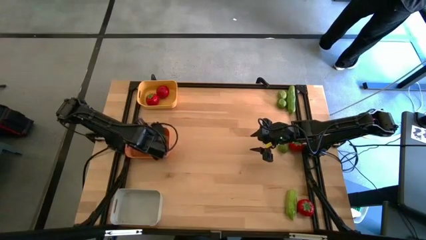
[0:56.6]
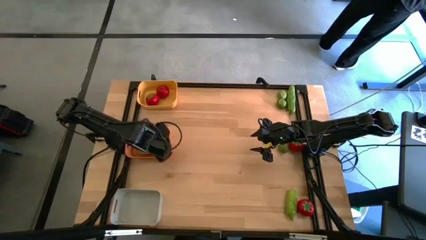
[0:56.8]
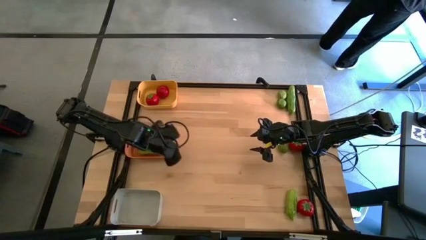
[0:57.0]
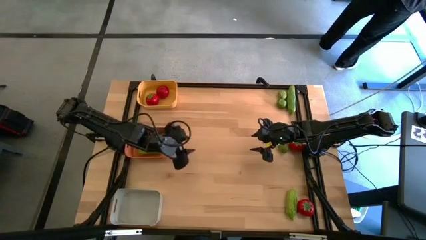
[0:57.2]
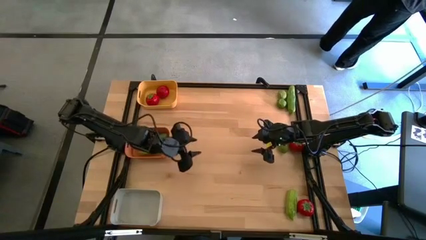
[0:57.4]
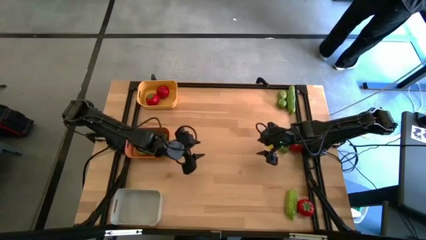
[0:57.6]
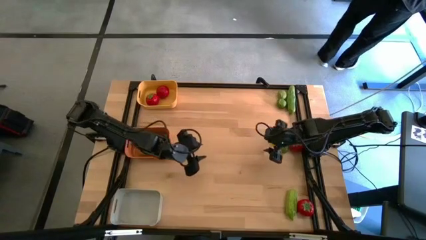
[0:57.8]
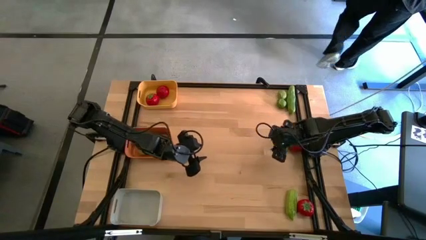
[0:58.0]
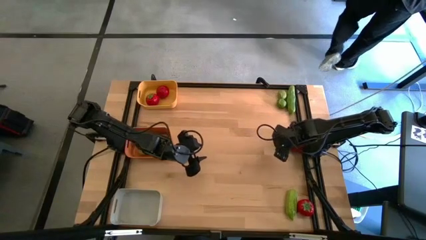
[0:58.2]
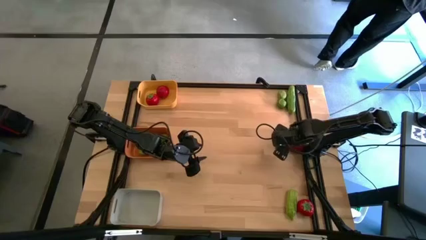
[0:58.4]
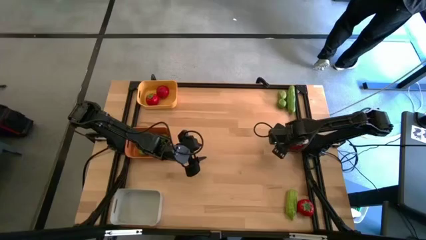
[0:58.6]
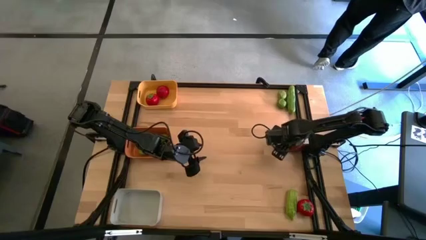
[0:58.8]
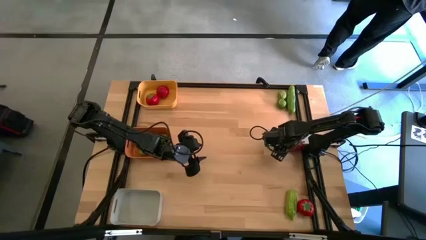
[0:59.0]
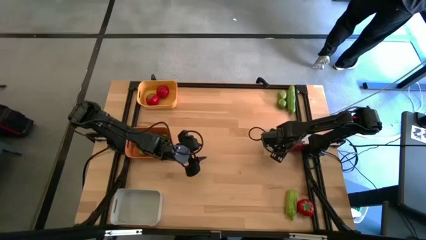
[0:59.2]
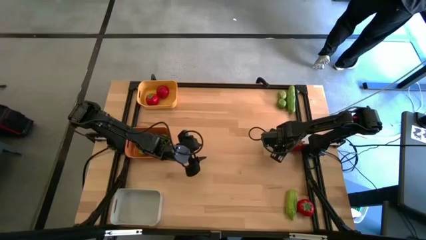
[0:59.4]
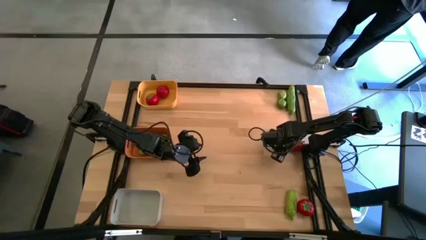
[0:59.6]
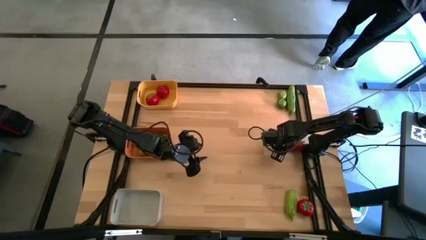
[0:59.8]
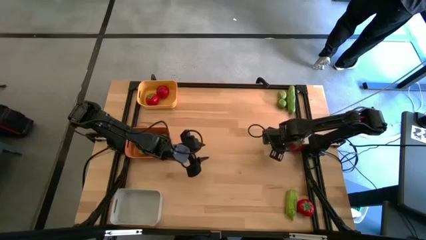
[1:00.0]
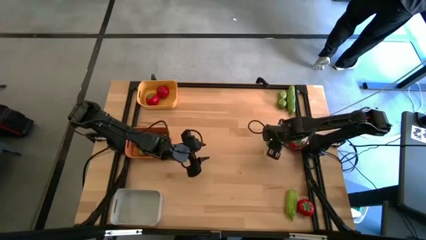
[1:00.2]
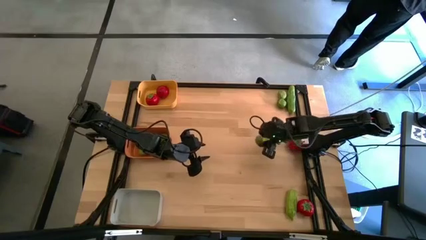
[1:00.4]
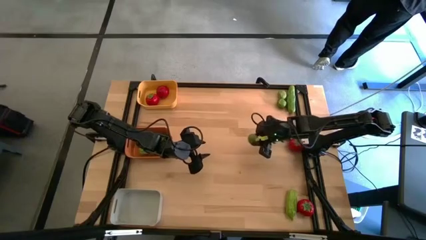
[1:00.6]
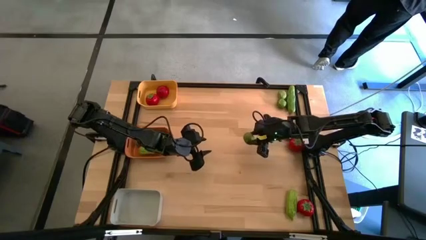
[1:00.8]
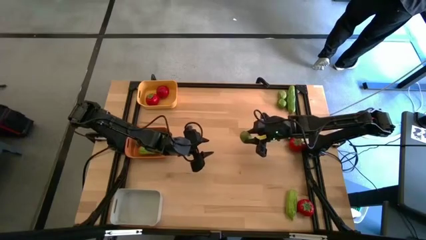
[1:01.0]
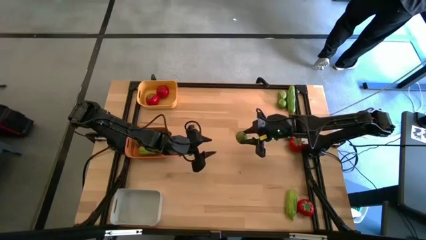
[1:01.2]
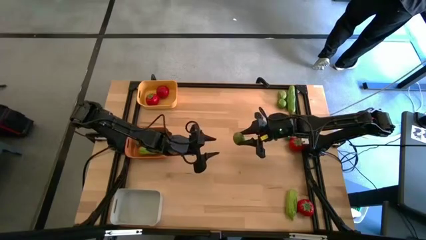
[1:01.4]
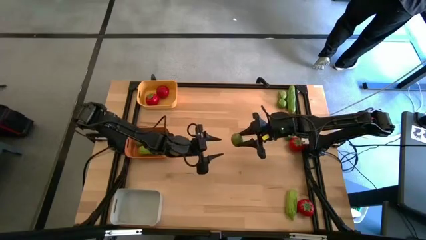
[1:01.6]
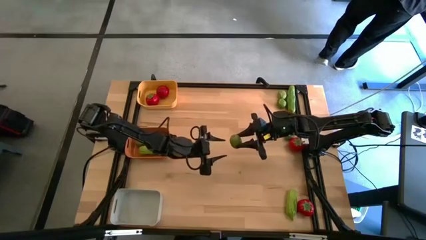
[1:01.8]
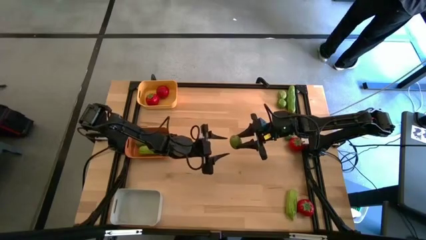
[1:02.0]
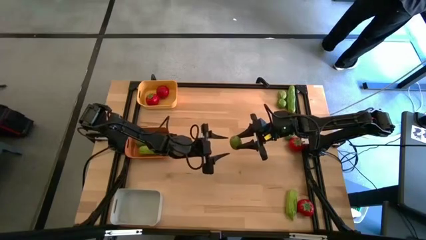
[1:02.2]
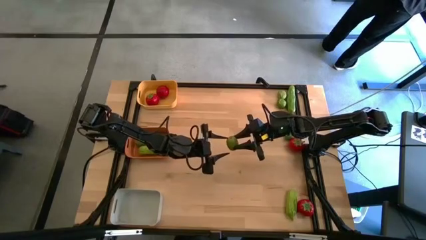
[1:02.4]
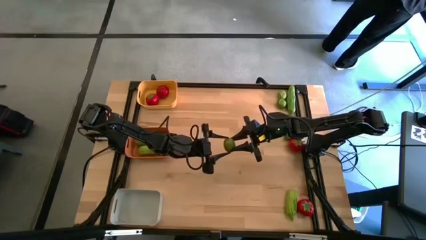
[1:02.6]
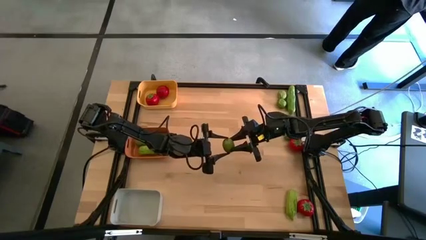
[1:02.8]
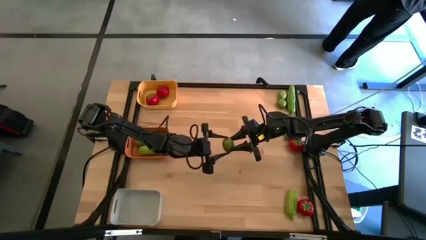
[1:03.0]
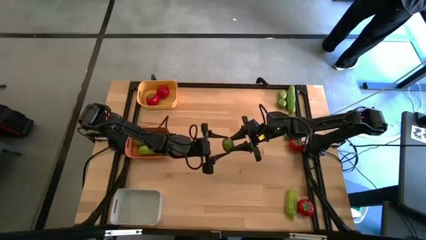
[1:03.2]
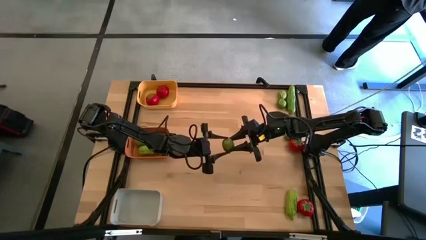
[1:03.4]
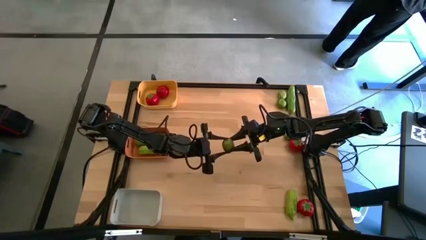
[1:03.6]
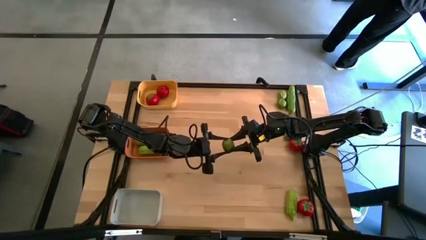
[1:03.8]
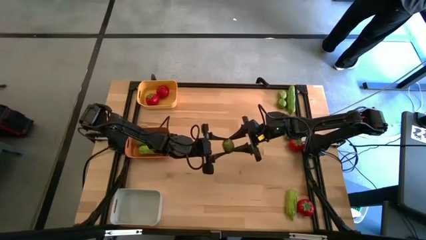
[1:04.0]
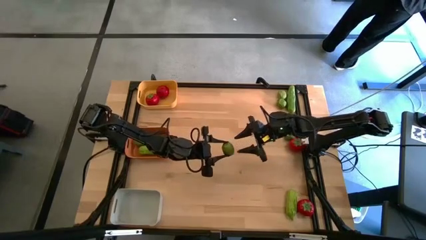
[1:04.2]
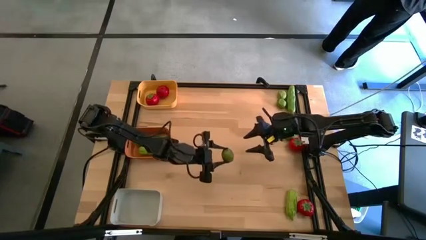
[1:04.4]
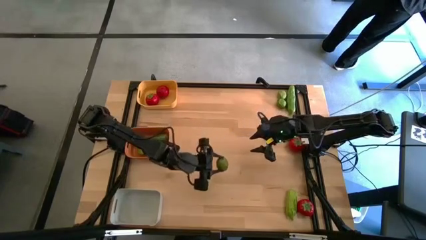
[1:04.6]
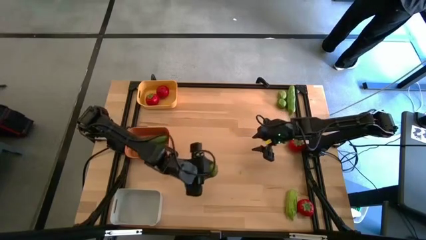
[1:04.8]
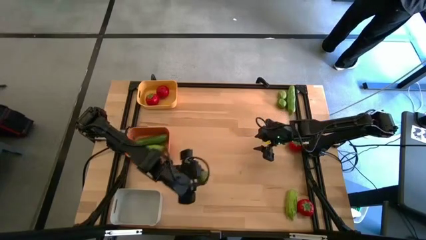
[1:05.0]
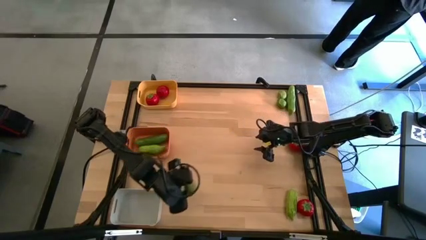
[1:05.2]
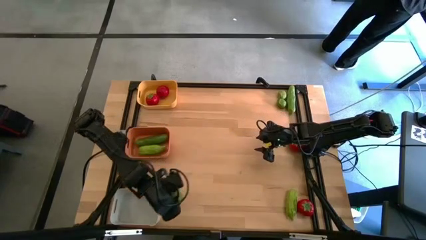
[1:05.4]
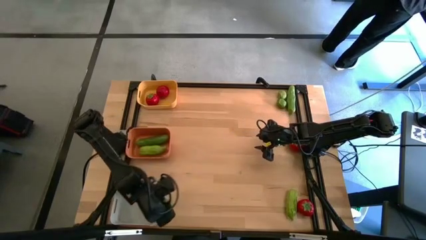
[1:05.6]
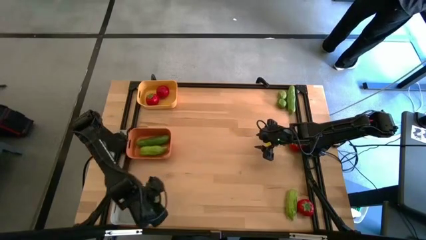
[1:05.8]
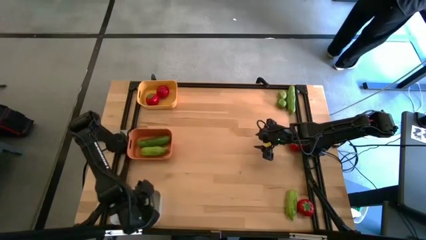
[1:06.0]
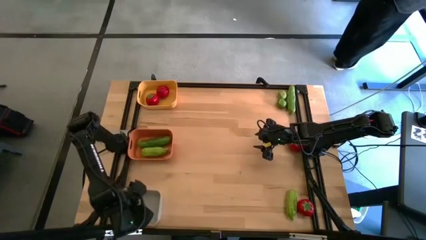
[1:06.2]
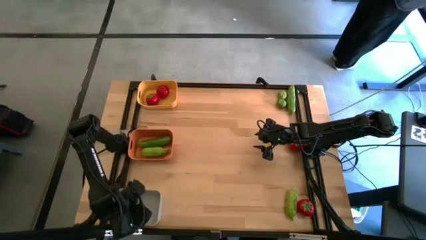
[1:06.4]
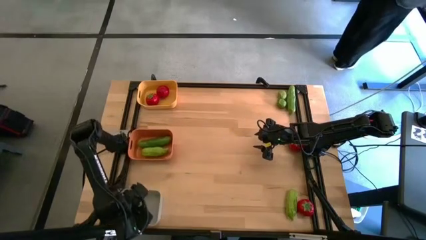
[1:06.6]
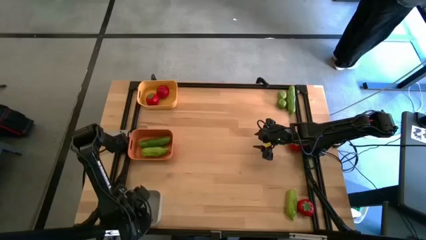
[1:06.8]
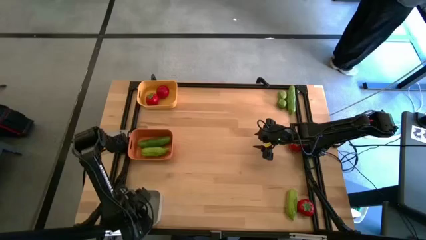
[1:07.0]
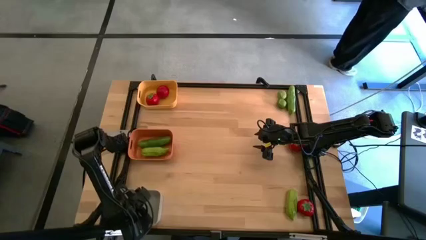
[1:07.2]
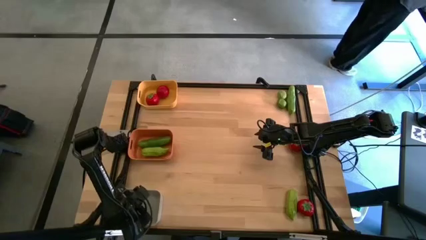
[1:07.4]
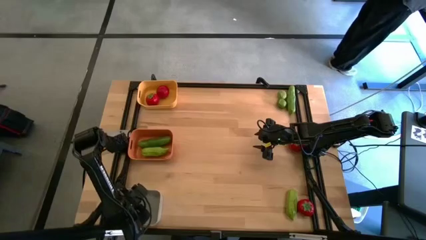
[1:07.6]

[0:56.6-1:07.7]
Task: Sort produce into baskets
Put the lime into the gray bin

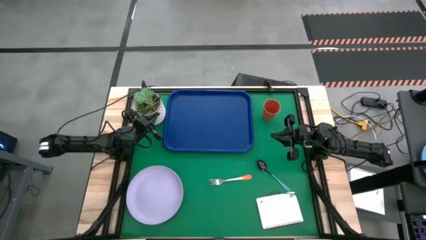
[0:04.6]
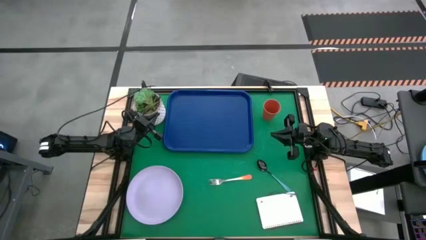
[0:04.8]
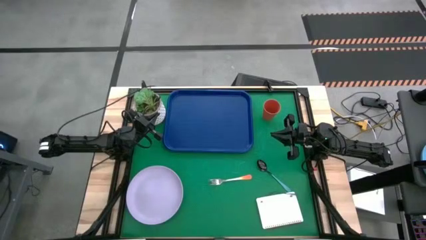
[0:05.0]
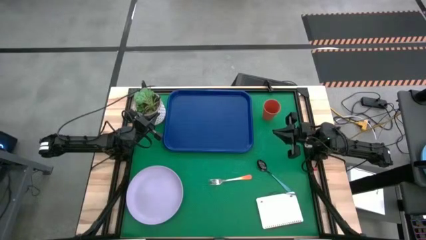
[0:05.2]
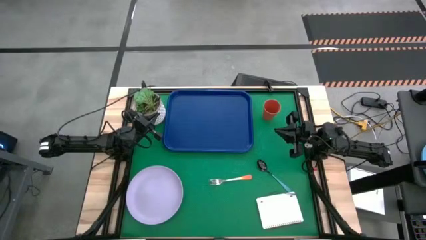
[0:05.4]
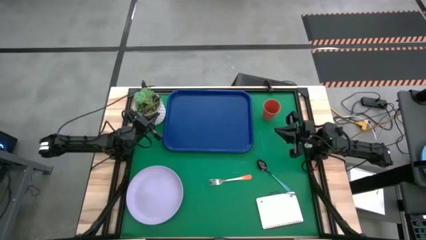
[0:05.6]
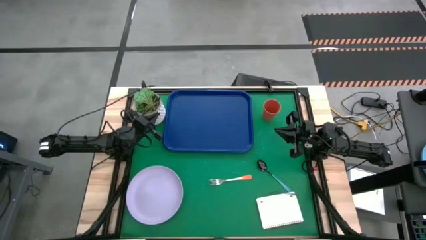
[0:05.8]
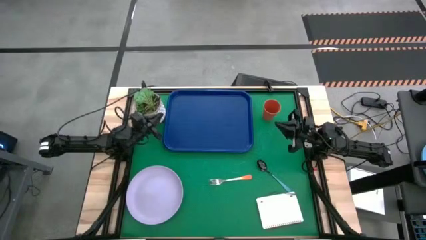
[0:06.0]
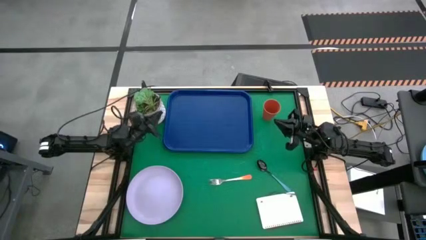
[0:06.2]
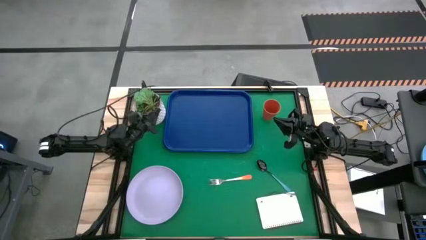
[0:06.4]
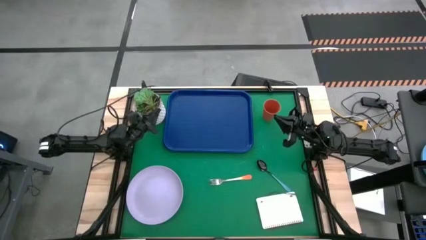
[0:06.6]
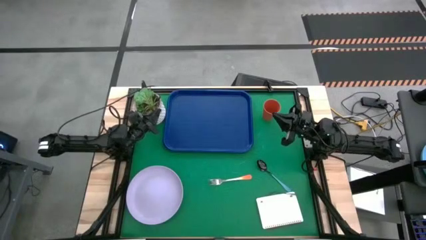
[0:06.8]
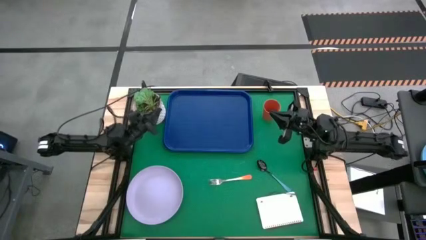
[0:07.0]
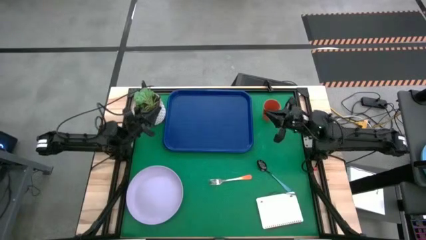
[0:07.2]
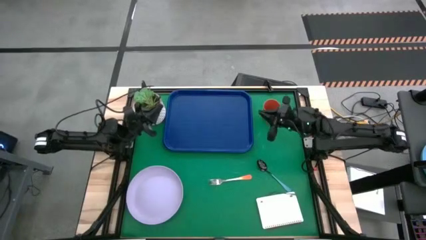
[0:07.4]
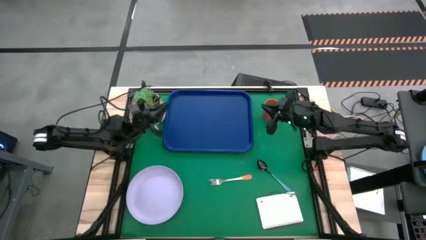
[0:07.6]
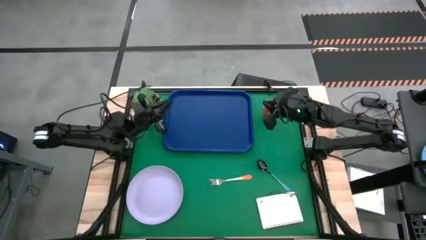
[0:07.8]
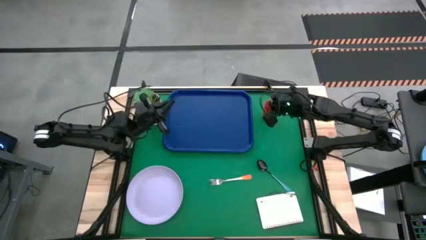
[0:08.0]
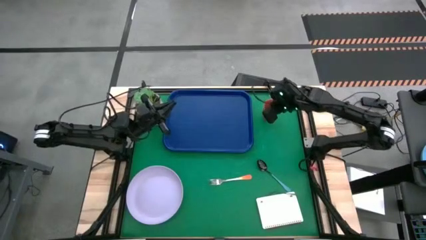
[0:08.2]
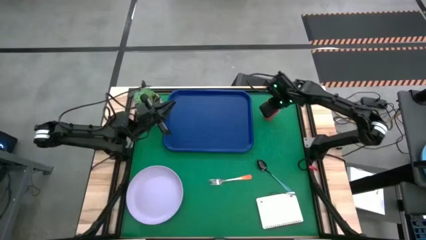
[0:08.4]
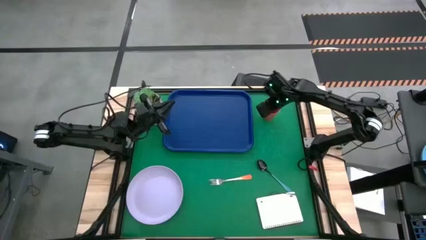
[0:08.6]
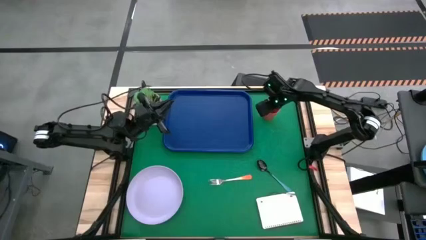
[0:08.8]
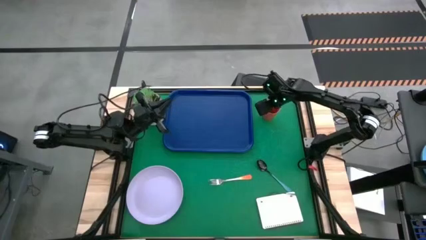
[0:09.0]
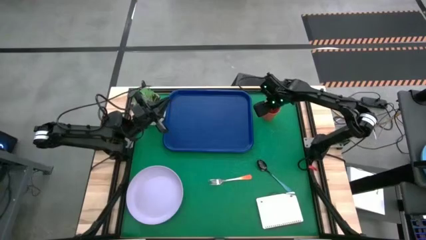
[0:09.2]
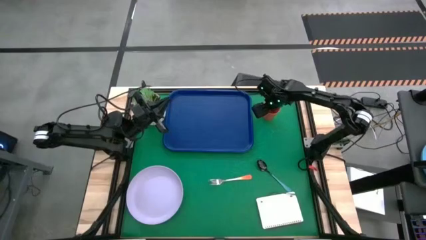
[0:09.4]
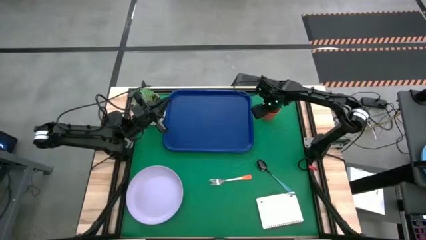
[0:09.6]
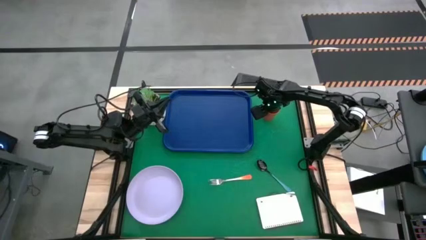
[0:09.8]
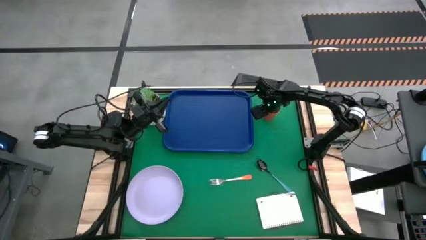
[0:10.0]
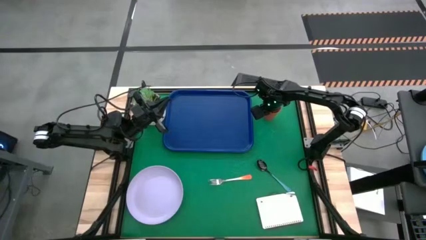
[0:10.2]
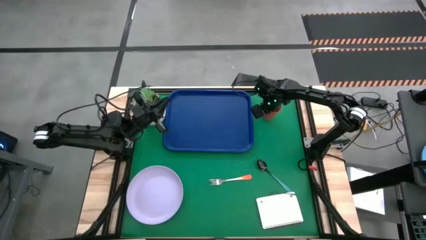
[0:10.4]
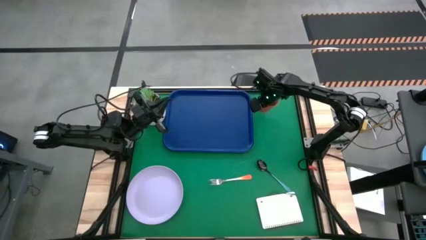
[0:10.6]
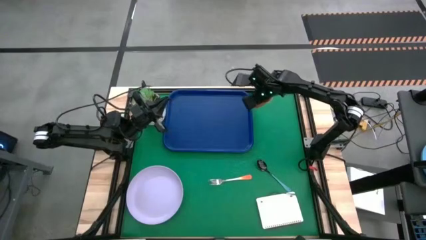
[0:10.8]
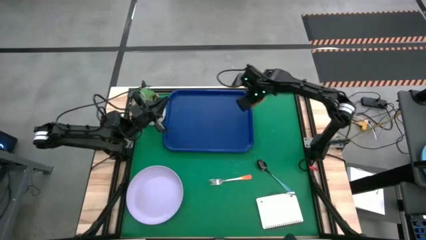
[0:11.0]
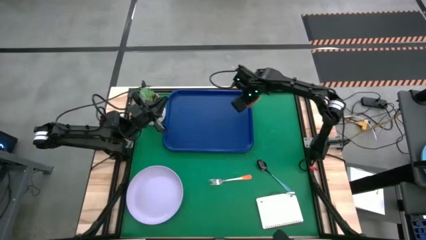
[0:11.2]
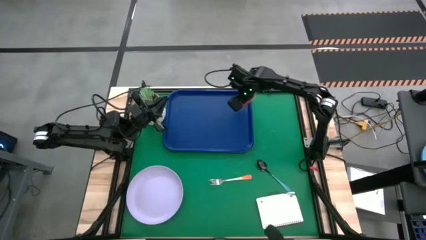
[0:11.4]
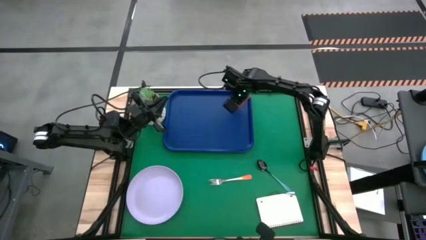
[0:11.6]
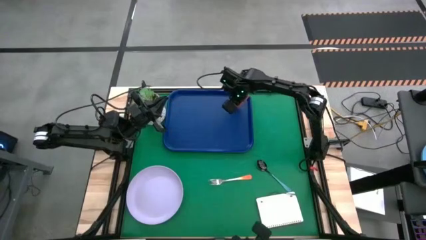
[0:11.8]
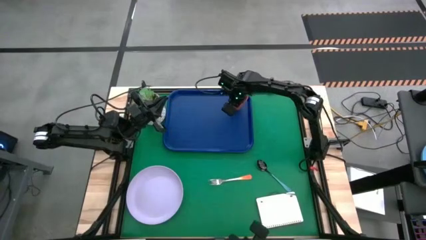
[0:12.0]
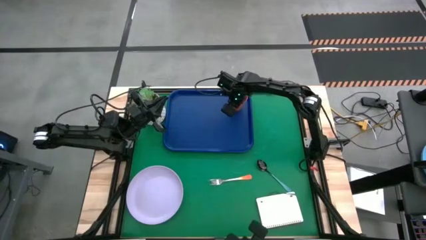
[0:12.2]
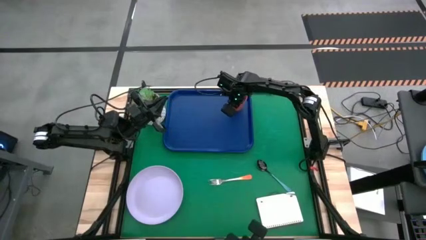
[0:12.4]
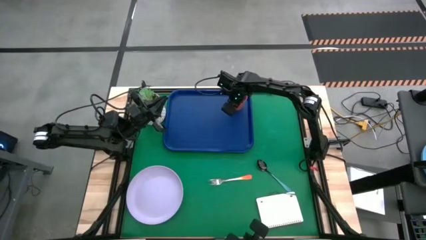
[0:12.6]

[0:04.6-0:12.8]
Task: Pick and place plate/cup/fork/spoon on tray
Put the orange cup on the blue tray
